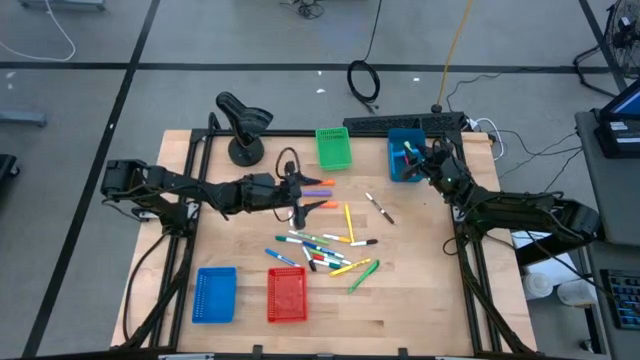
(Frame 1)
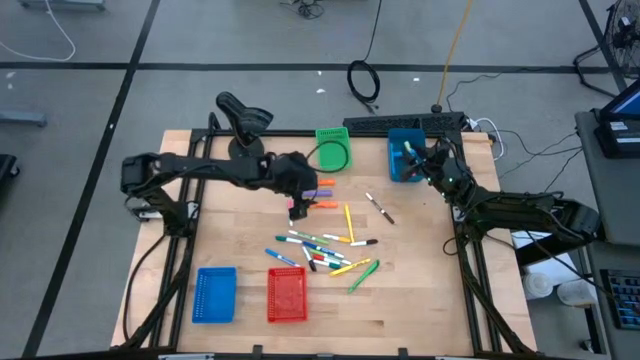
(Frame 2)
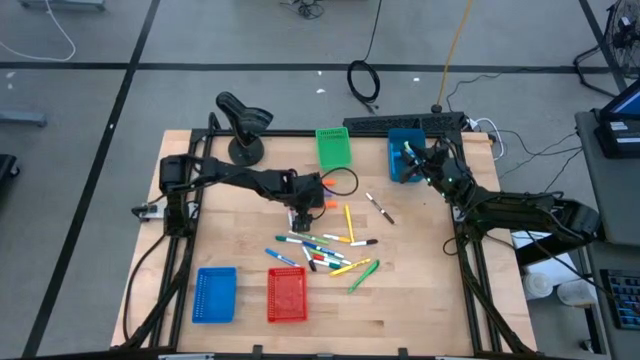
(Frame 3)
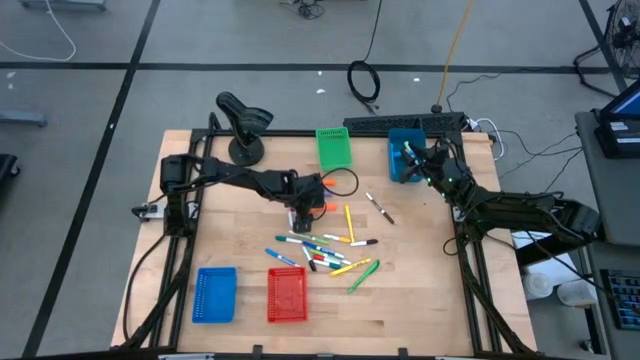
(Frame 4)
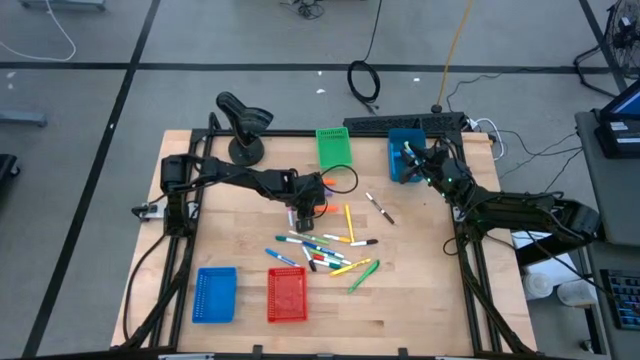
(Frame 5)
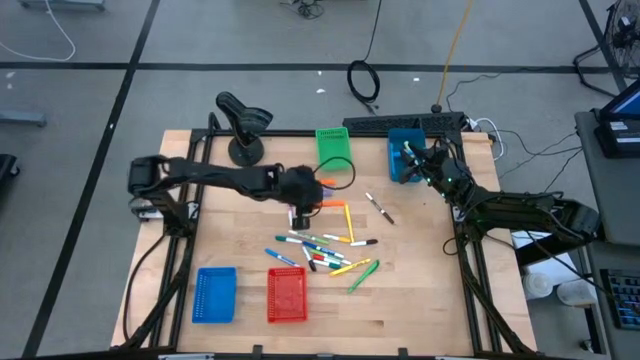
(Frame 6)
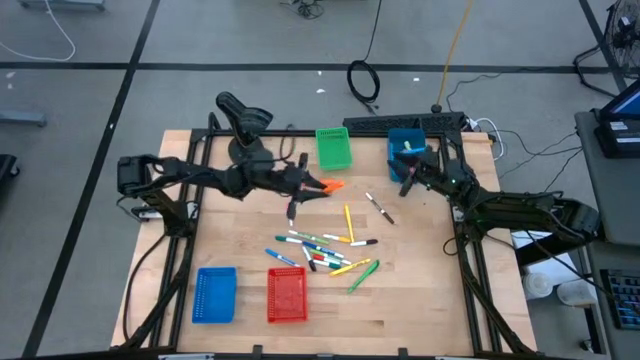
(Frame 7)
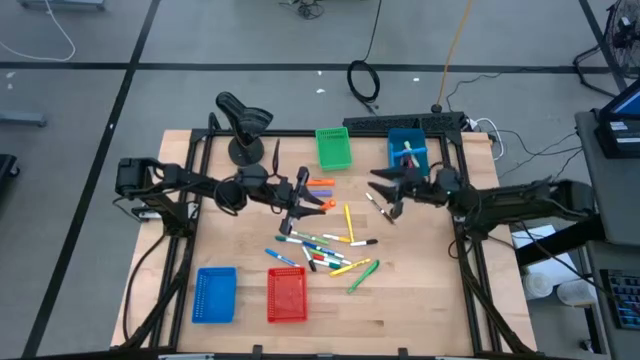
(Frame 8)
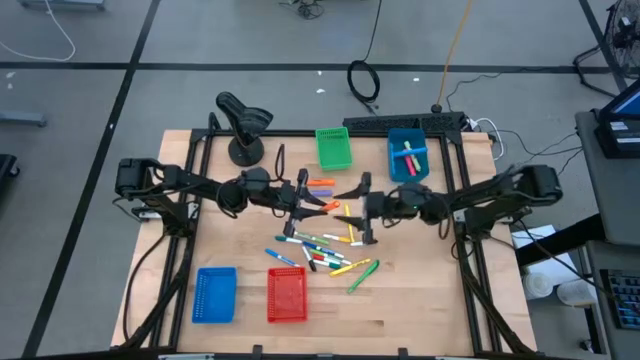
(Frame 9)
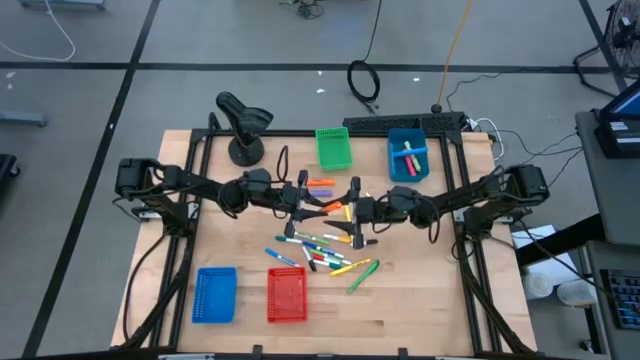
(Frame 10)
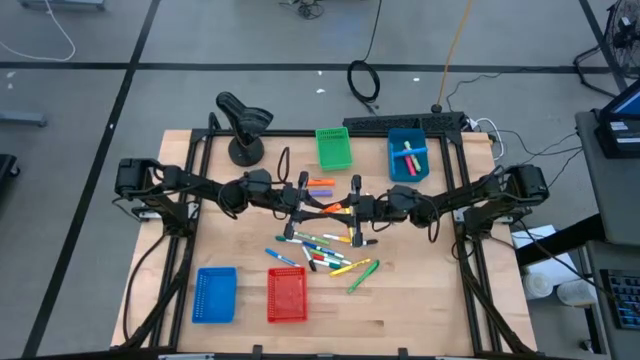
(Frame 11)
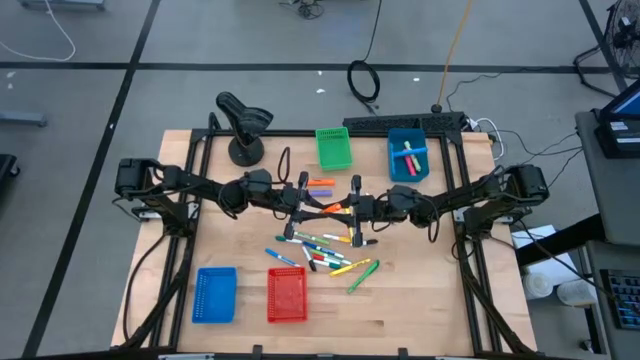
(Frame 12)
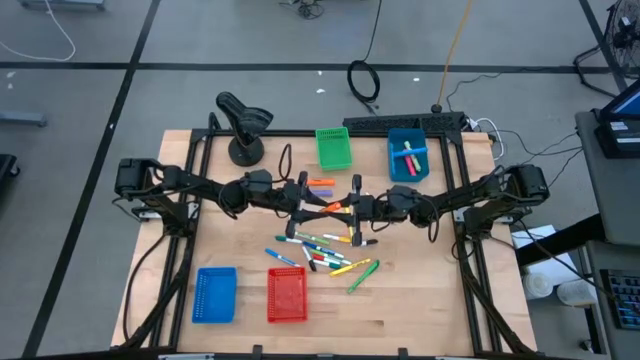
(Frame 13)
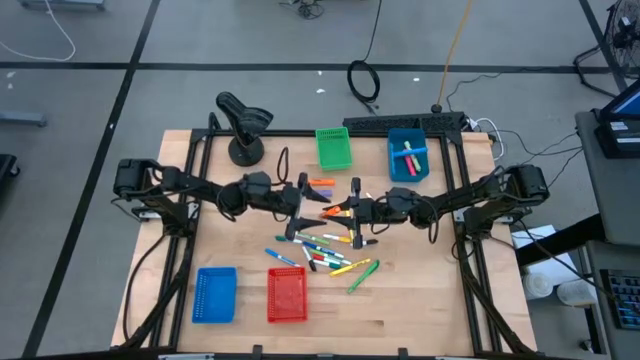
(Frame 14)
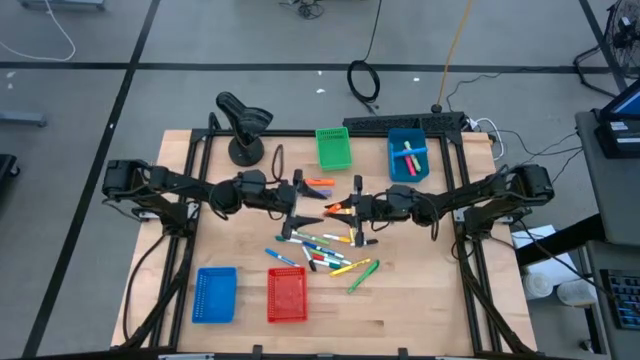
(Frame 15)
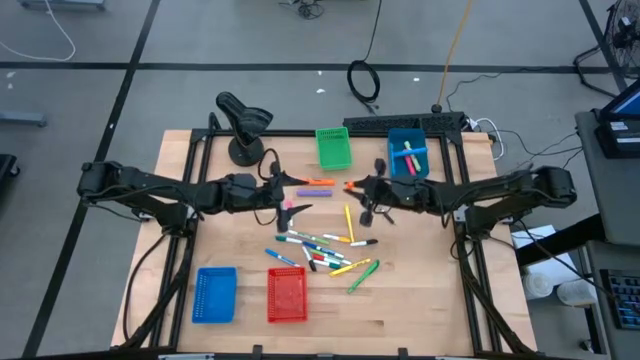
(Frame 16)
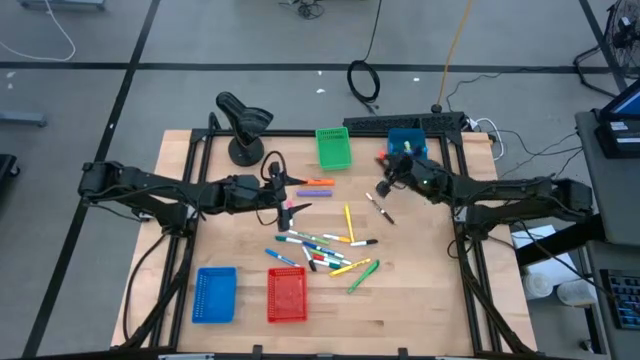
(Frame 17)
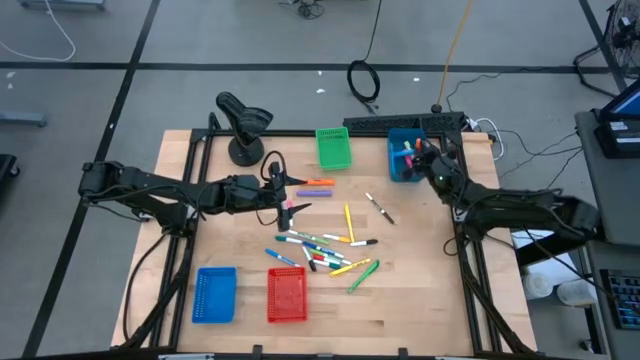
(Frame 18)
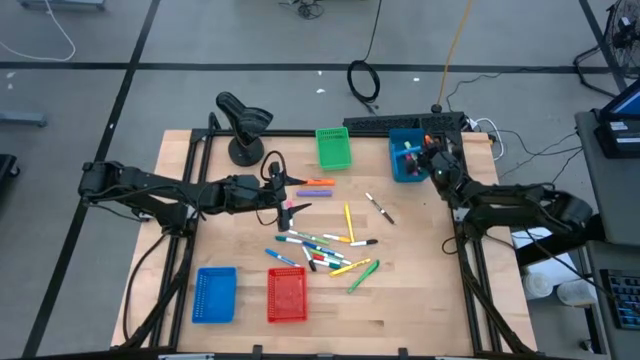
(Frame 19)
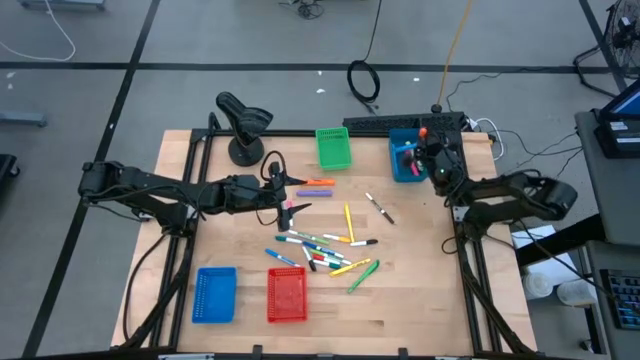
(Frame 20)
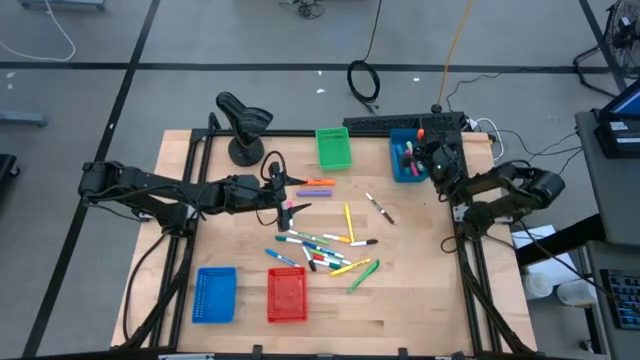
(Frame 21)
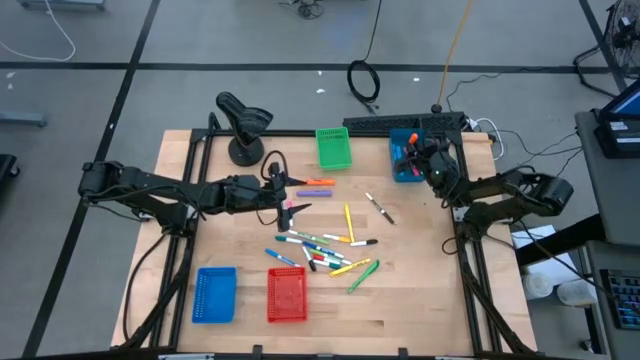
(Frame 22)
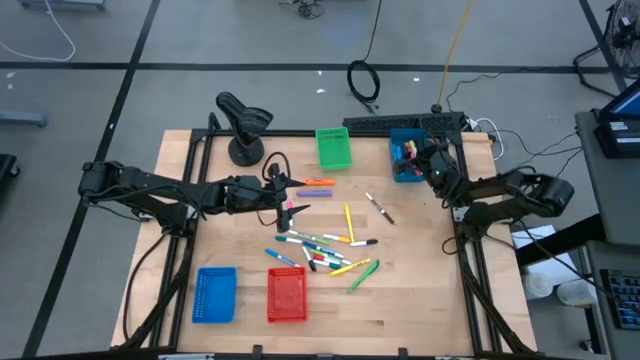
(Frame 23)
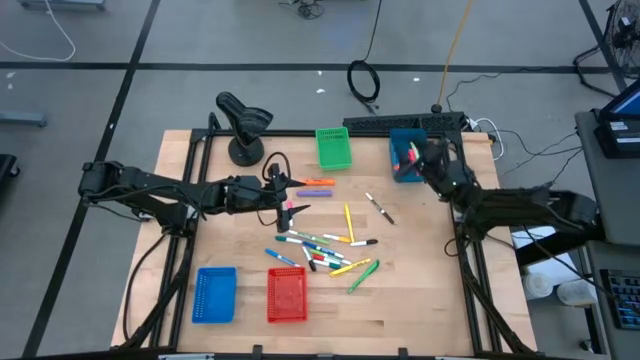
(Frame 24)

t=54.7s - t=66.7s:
Task: Pick & Place Markers
Put the bottom orange highlighter into the dark blue bin

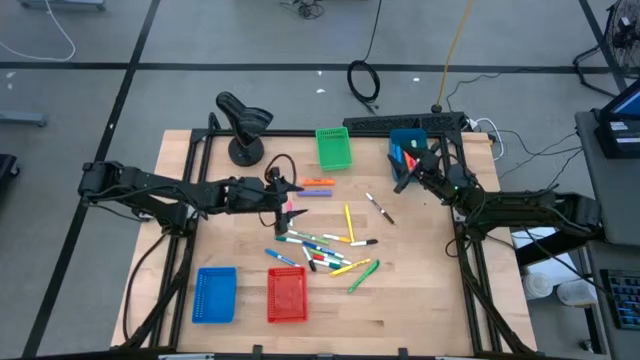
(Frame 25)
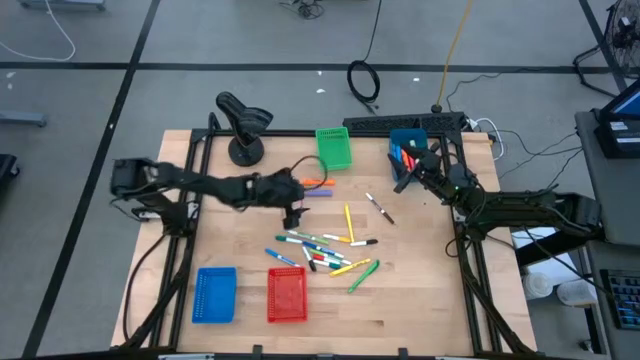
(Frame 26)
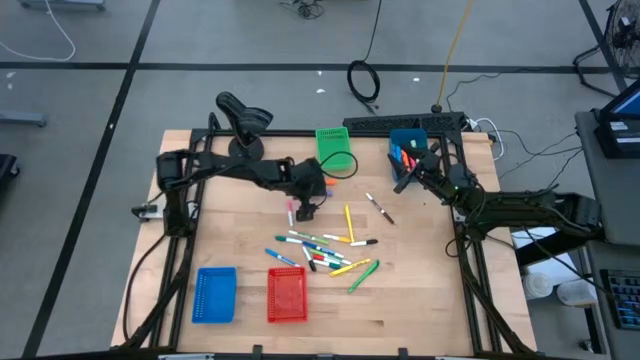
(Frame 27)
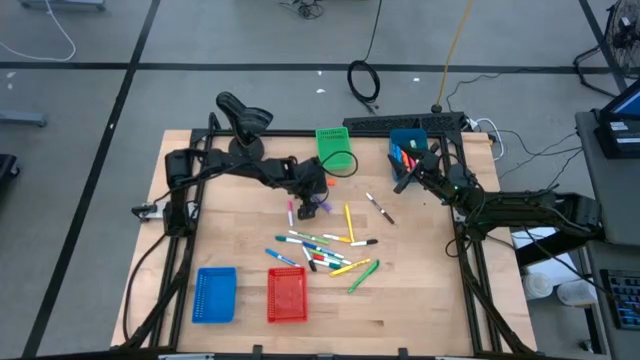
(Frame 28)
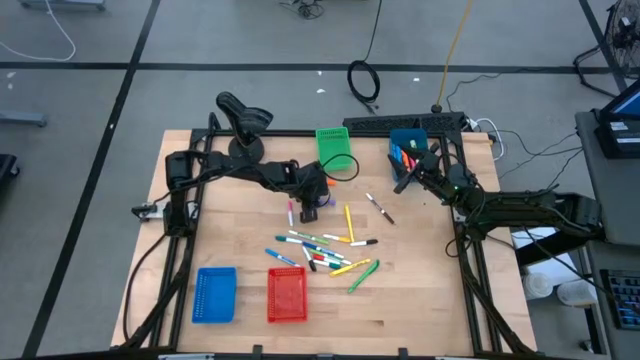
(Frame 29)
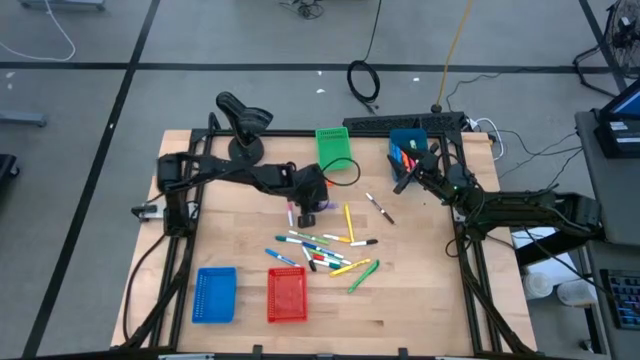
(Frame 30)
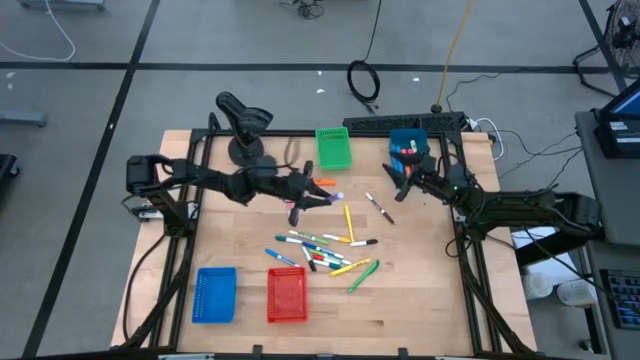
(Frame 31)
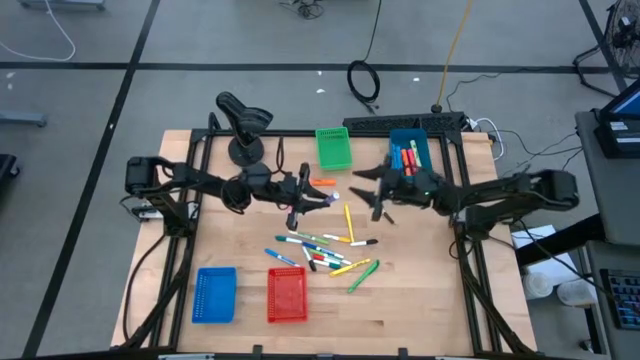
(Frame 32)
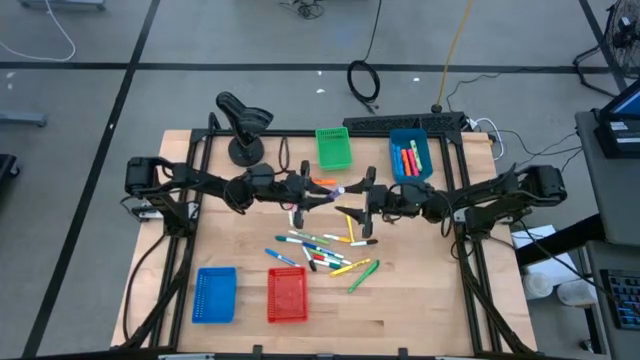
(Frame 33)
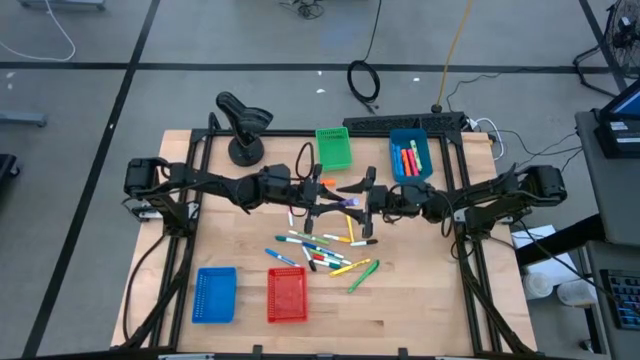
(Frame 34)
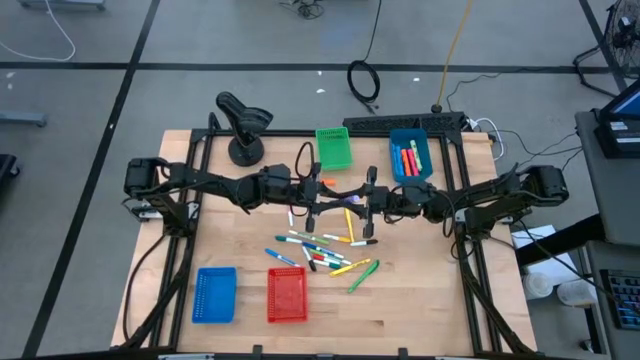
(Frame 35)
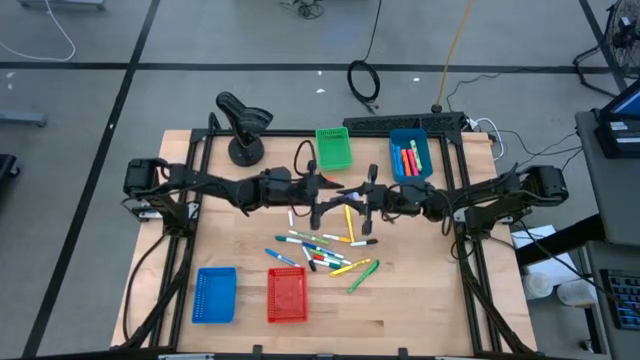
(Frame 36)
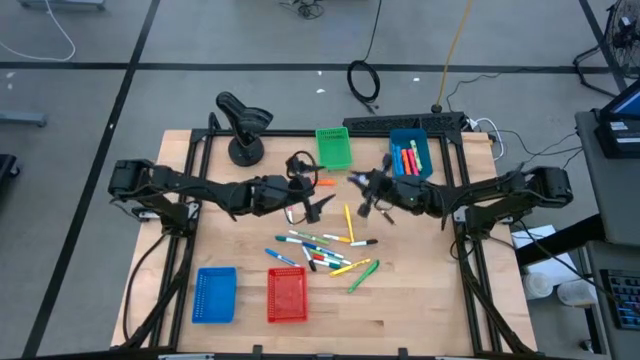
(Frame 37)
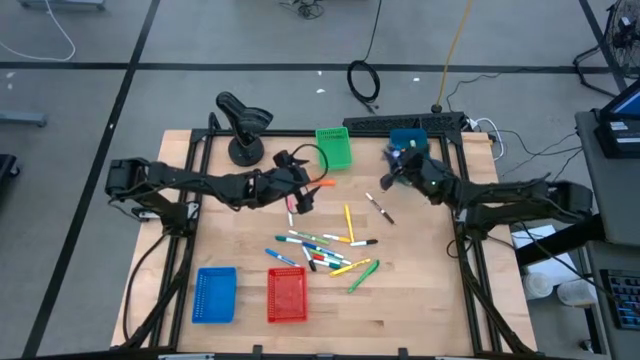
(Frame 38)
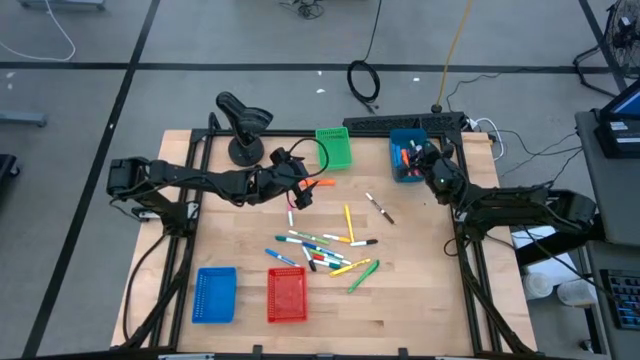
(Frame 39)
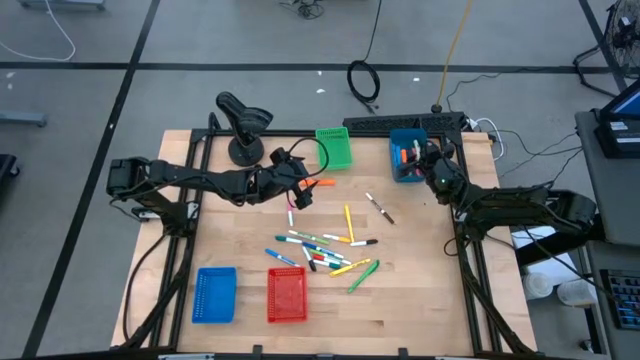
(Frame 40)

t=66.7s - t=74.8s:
Put the purple highlighter into the dark blue bin

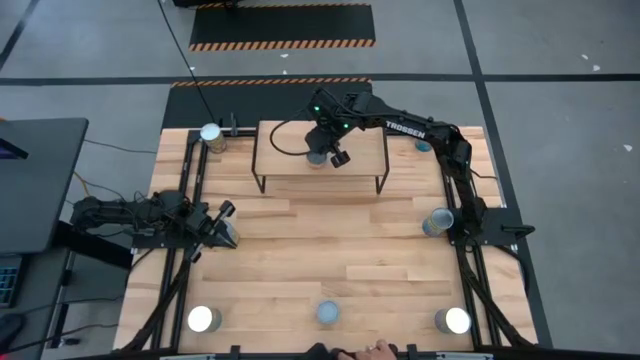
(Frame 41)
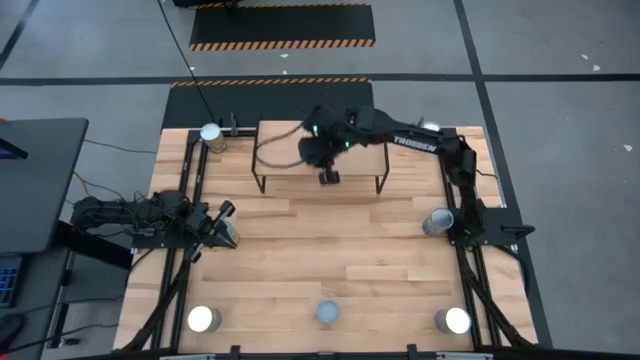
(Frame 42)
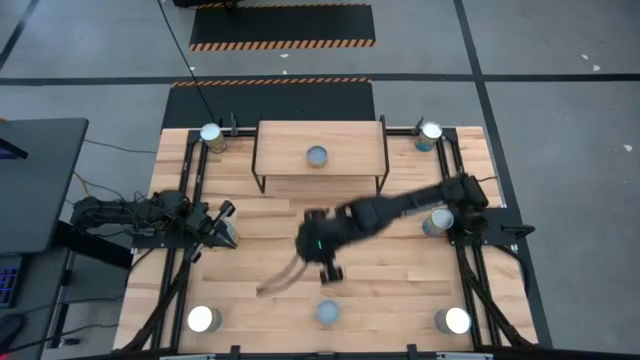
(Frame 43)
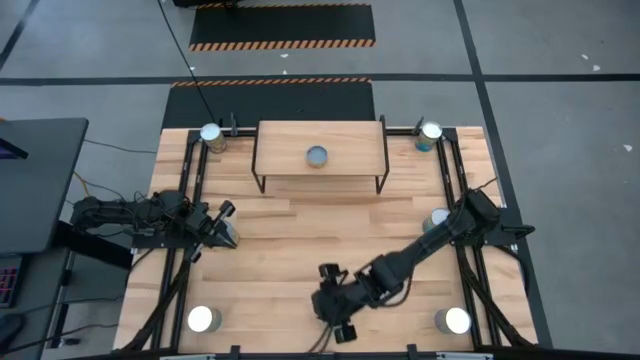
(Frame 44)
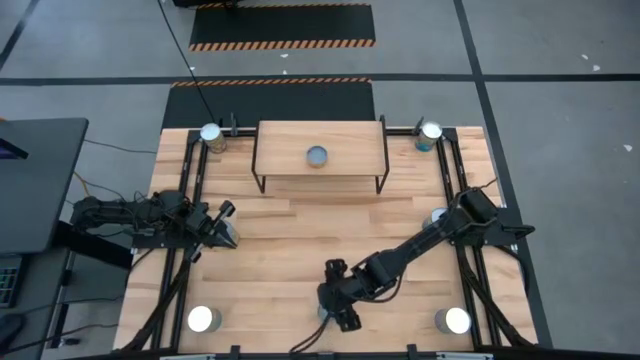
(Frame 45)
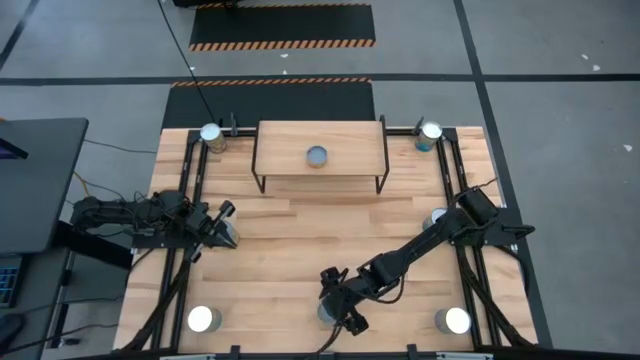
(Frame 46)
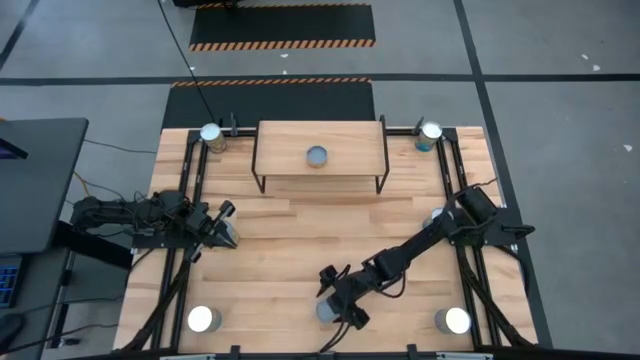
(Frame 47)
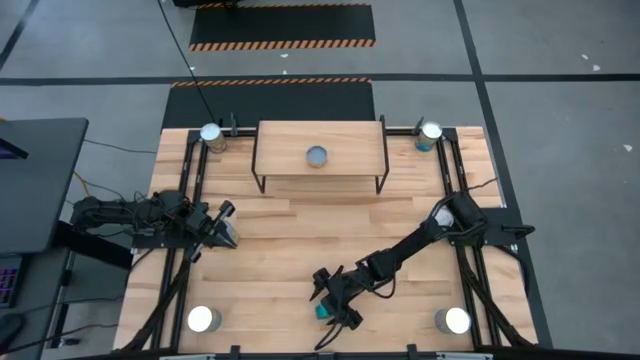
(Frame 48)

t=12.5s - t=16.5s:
Task: Pick and place cans onto a shelf
Put the small green tuna can on the shelf aligned with the other small yellow canned mushrooms
